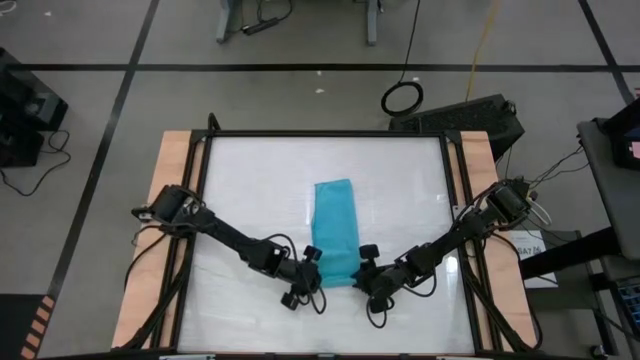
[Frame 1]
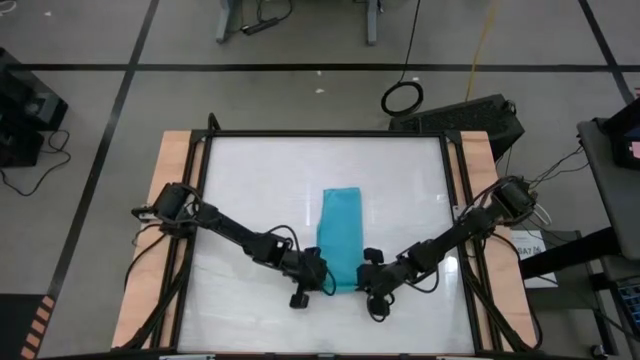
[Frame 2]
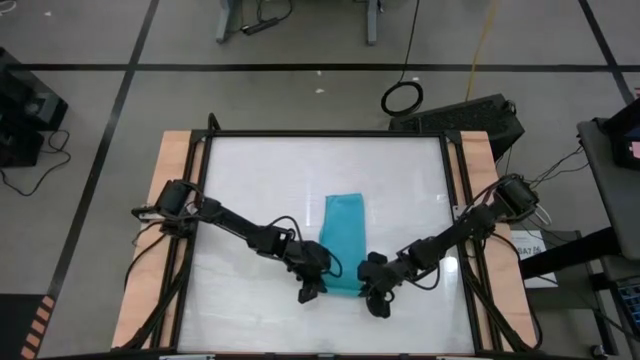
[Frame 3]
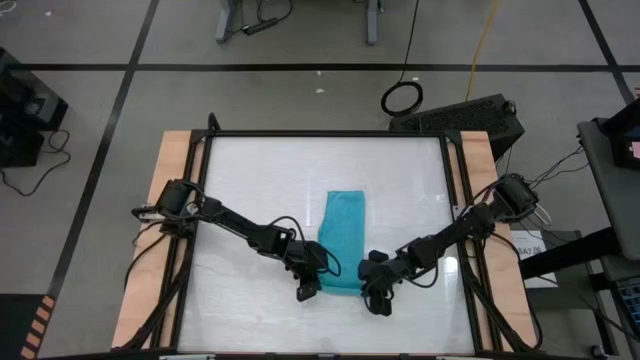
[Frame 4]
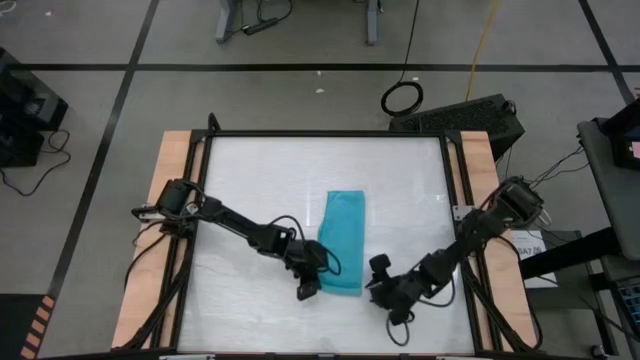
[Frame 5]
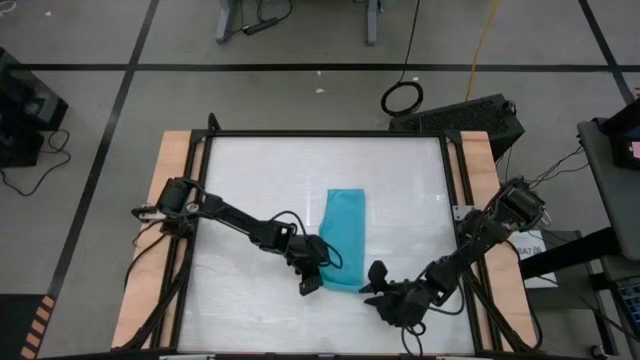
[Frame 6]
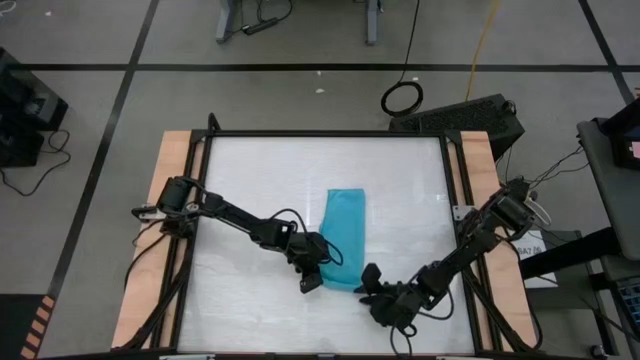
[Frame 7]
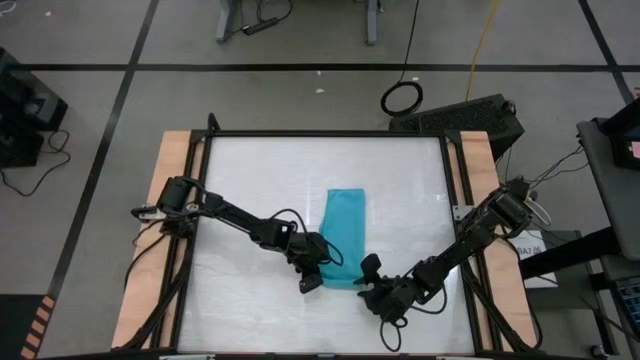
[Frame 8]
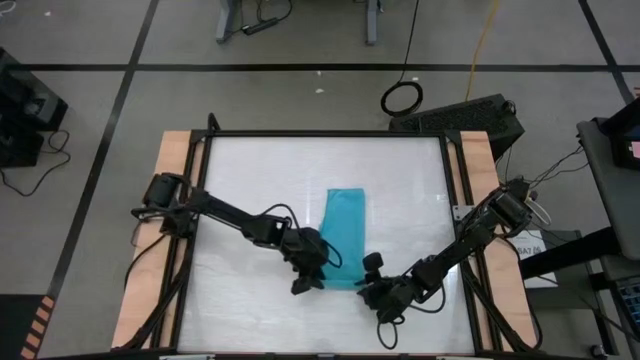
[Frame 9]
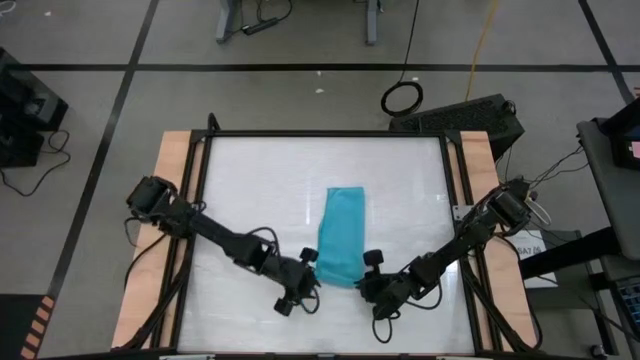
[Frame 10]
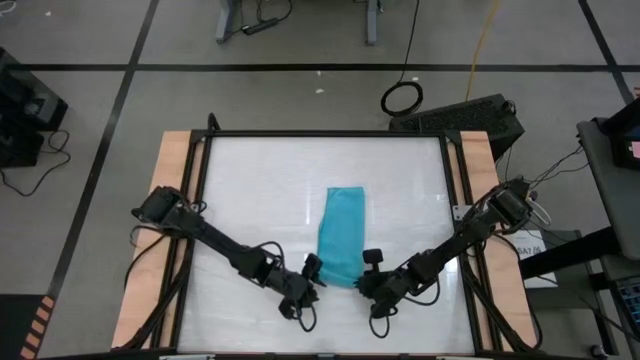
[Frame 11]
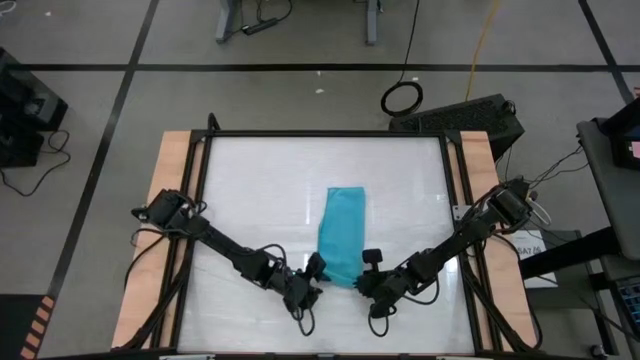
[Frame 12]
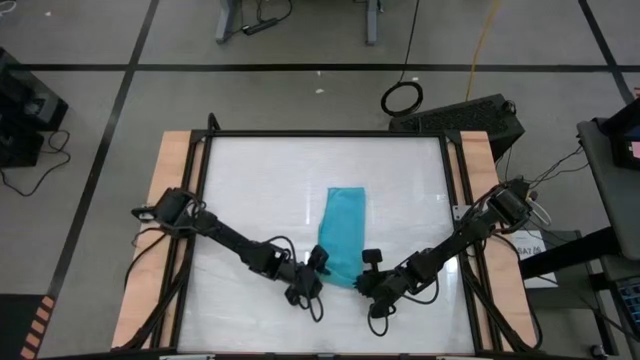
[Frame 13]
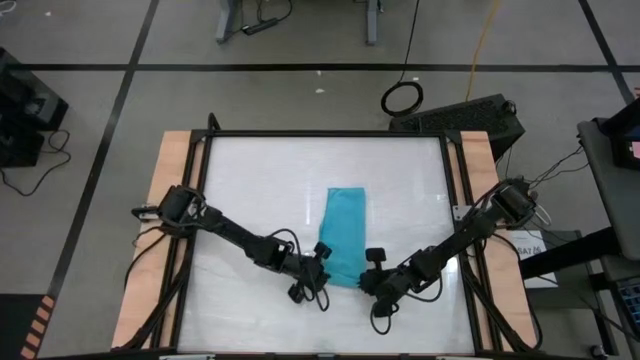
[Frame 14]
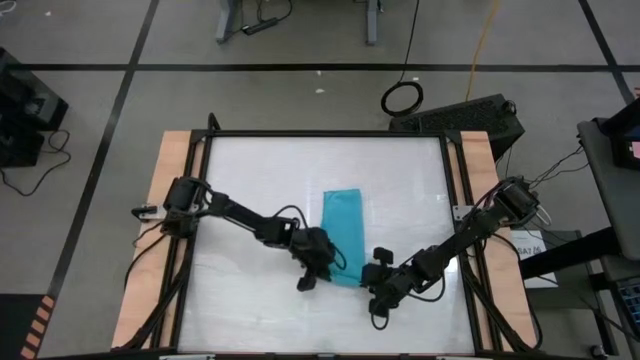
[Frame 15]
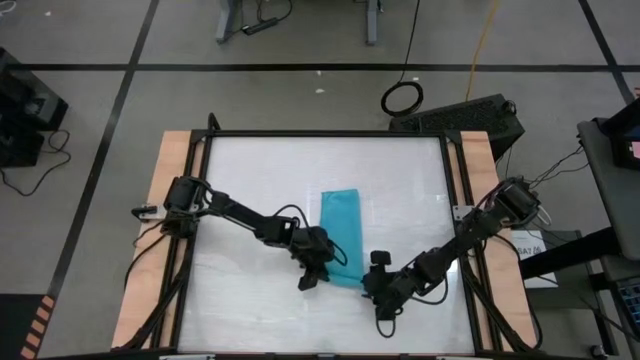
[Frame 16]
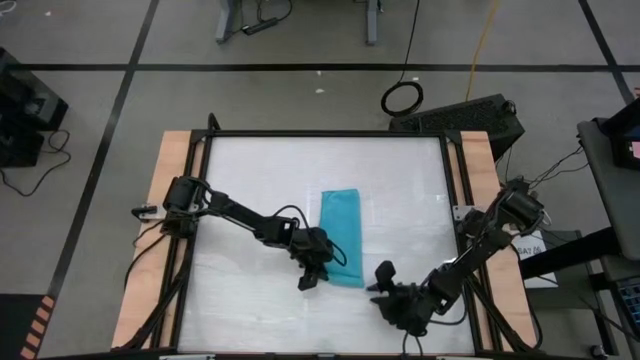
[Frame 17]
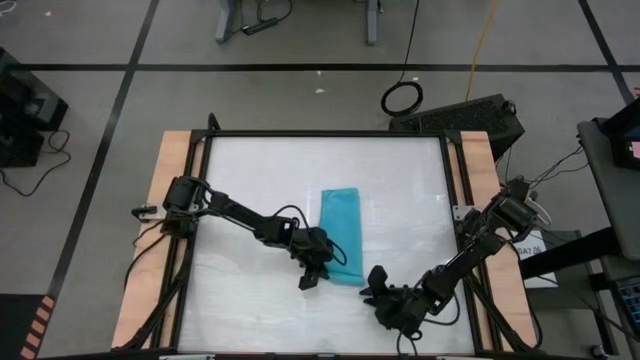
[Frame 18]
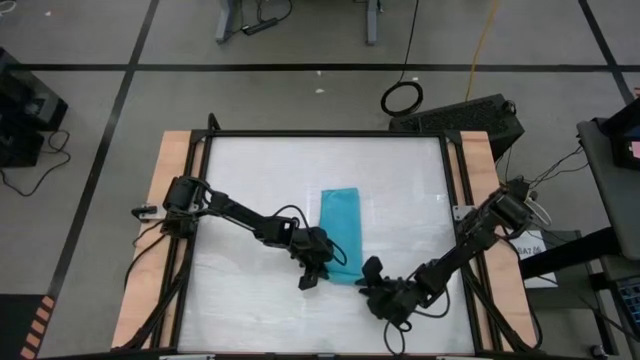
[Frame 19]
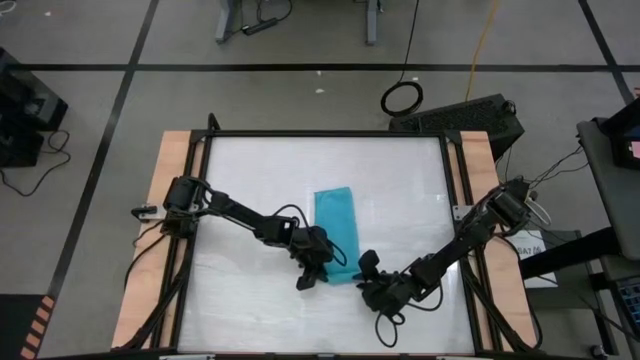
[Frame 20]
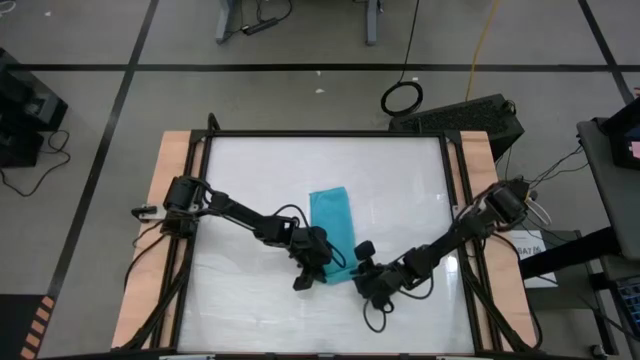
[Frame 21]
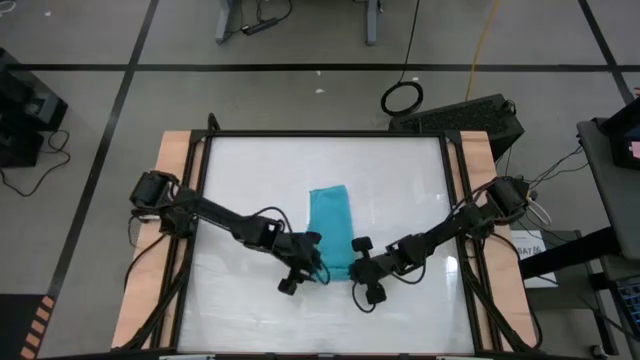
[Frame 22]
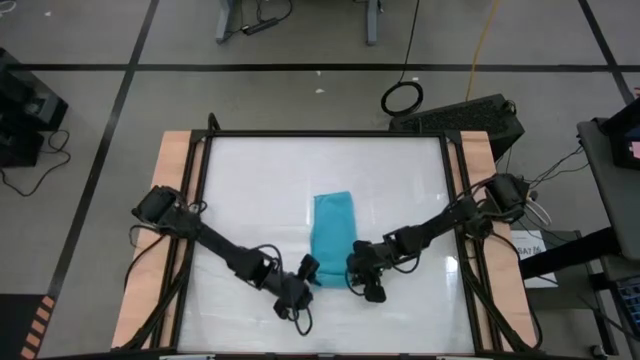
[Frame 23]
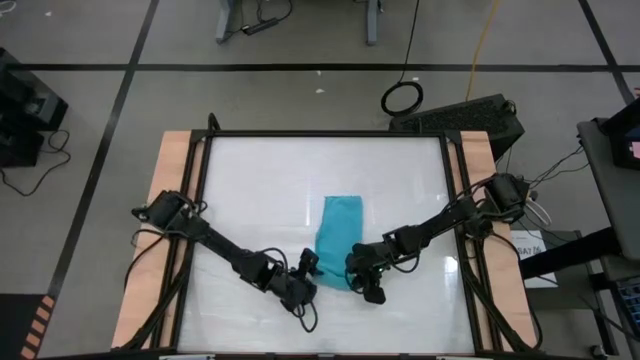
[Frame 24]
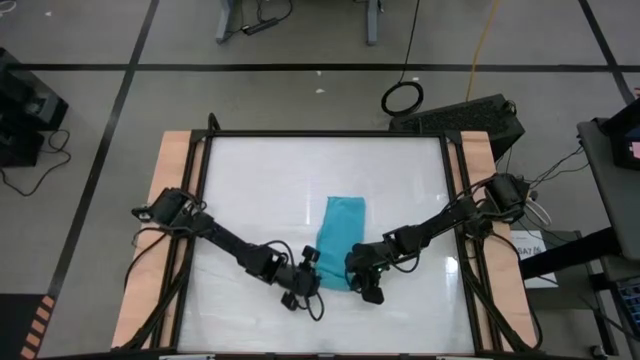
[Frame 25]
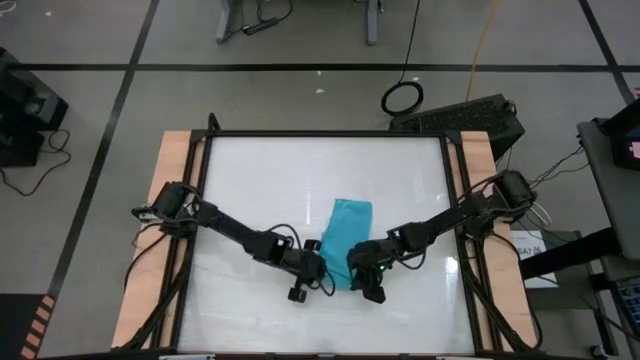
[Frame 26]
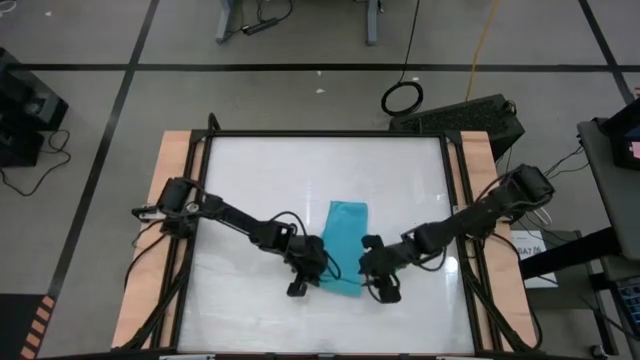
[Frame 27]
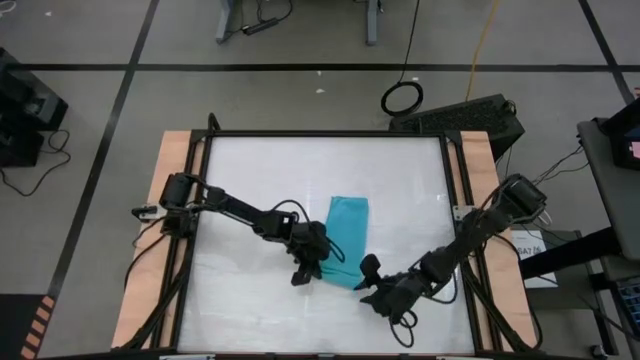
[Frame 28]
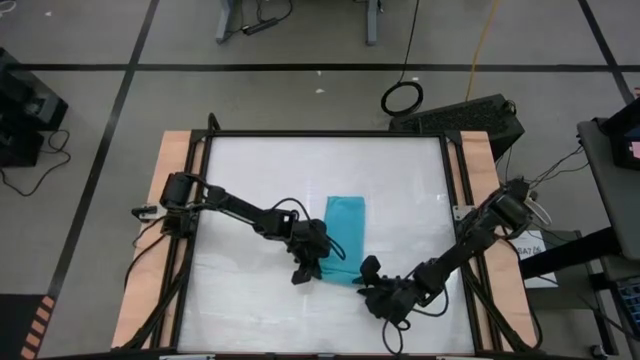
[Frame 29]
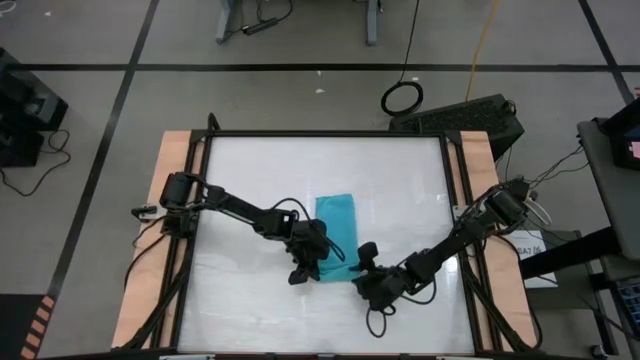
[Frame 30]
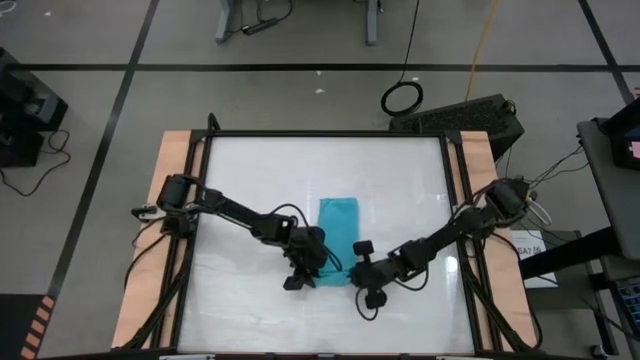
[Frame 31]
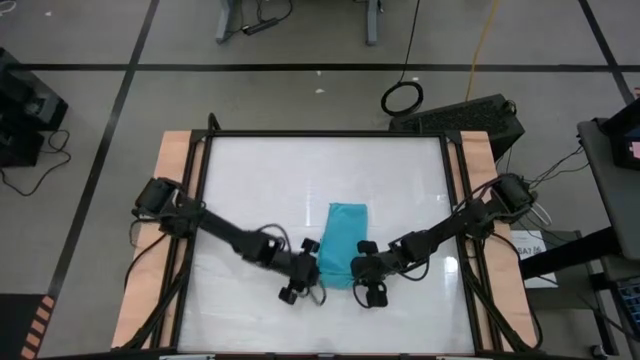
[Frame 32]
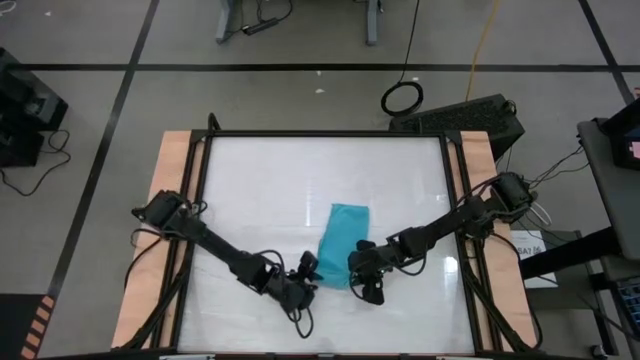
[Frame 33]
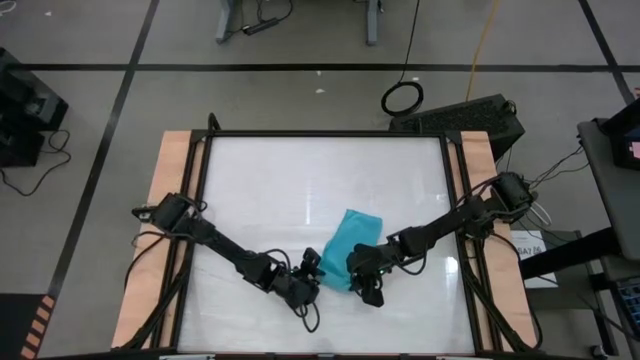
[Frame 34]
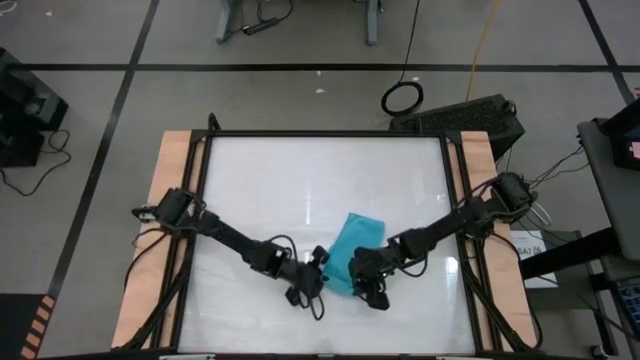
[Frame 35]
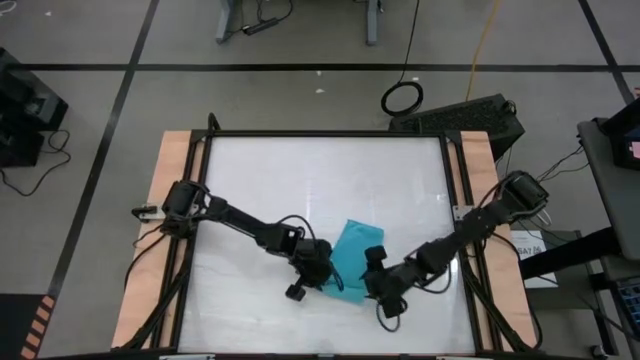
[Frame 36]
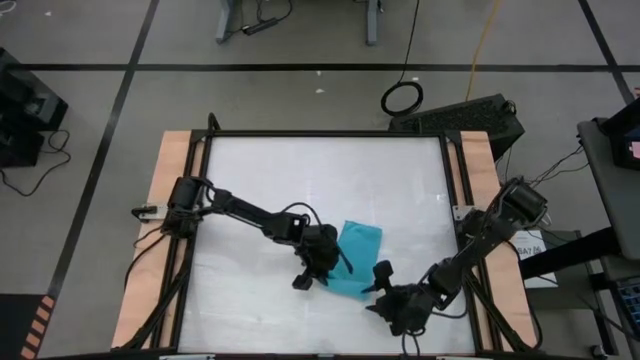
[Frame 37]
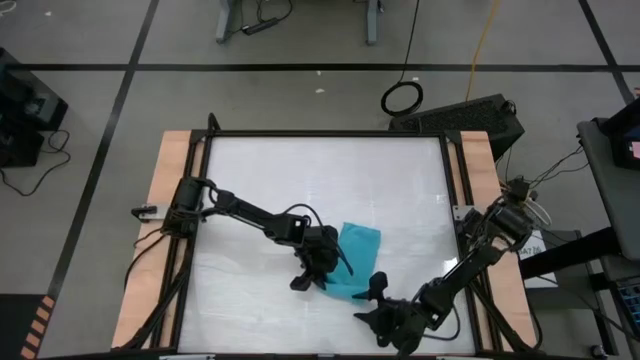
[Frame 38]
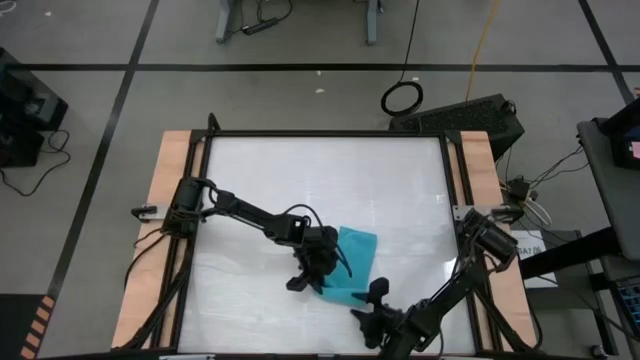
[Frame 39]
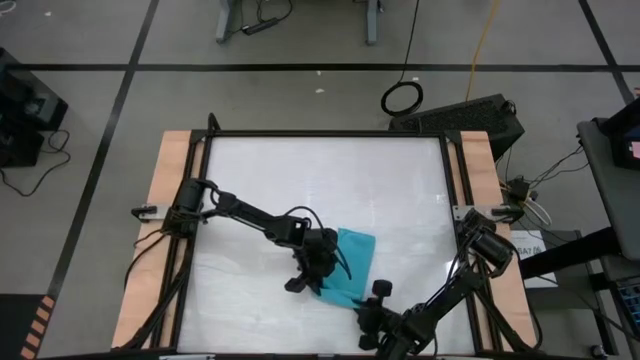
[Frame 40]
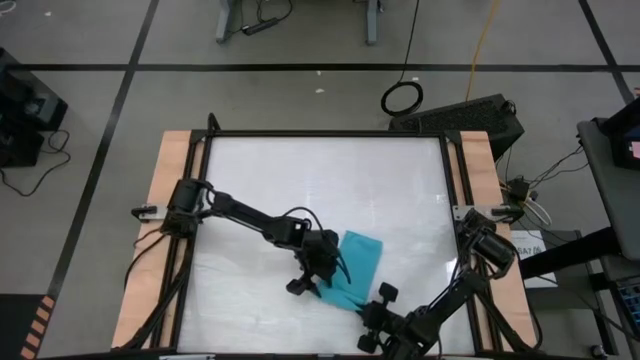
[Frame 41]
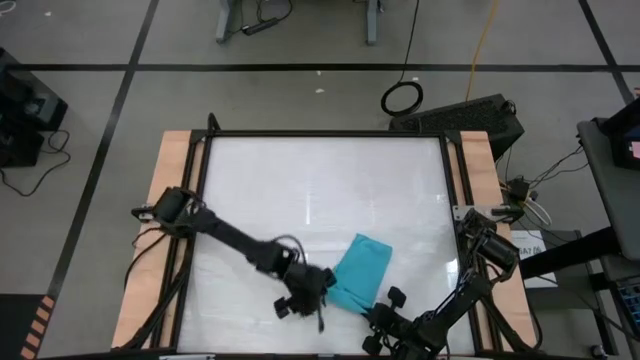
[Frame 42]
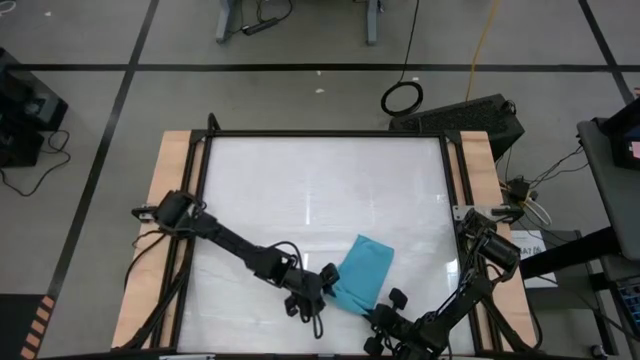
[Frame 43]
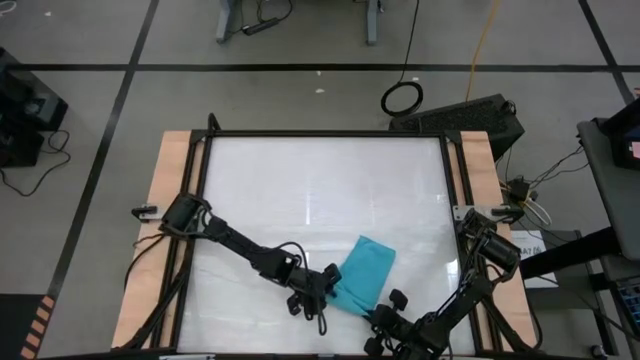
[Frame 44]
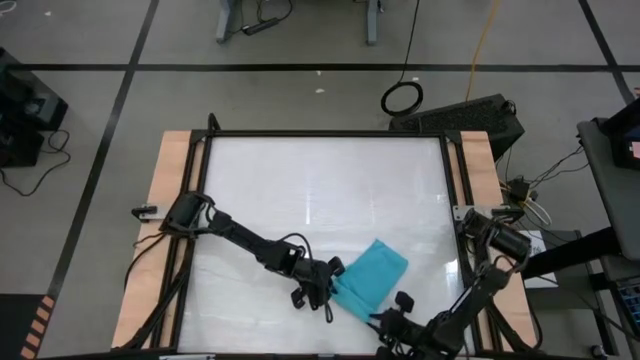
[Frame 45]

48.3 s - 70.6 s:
Task: Roll towel
Roll the blue microfiber cloth
